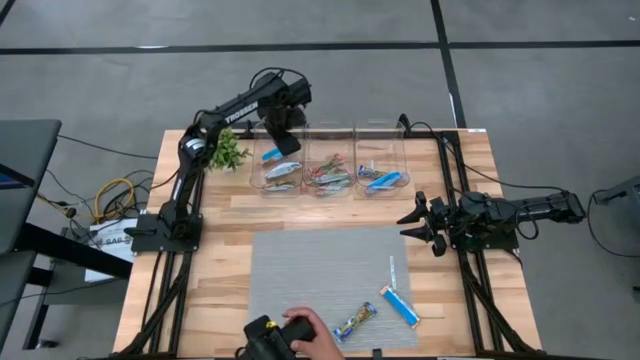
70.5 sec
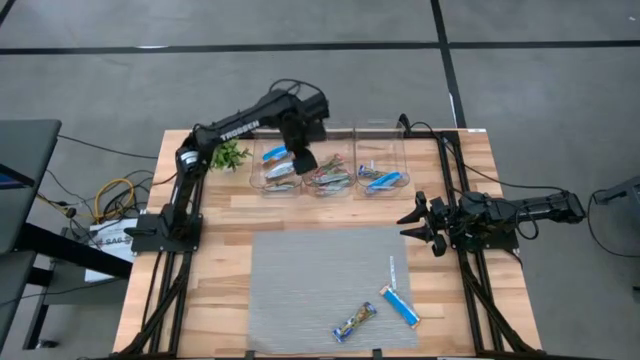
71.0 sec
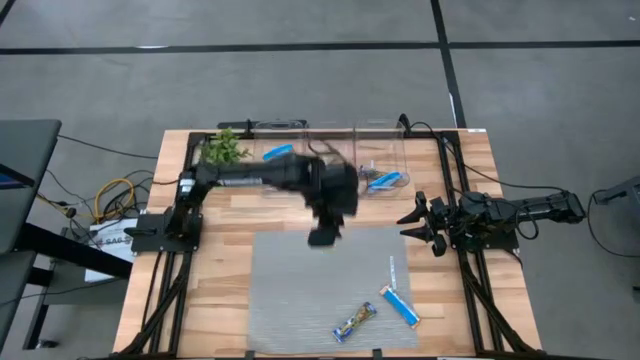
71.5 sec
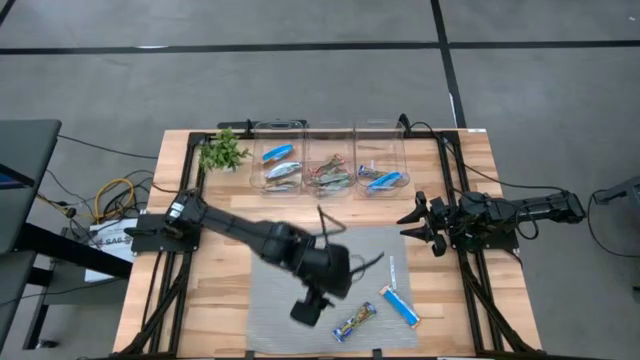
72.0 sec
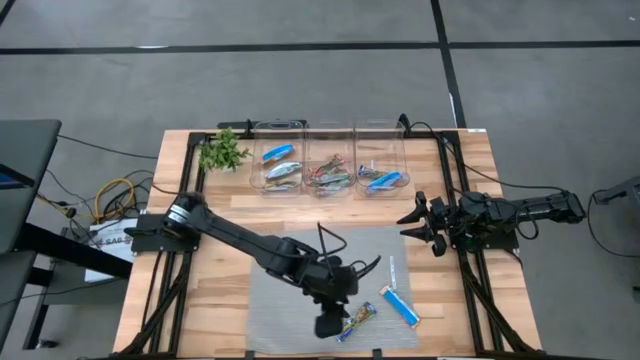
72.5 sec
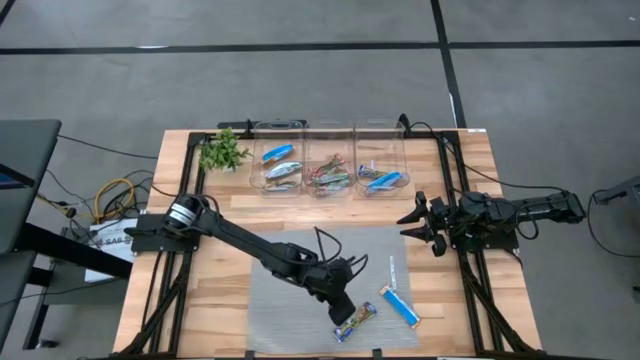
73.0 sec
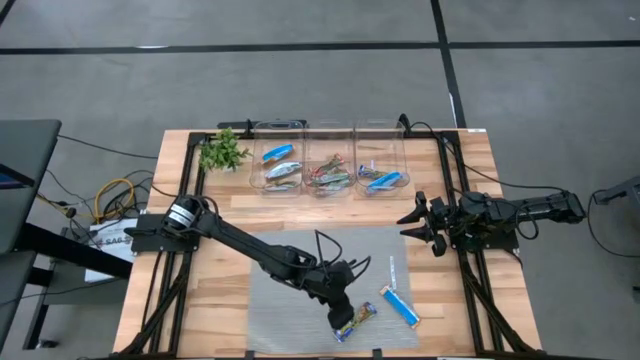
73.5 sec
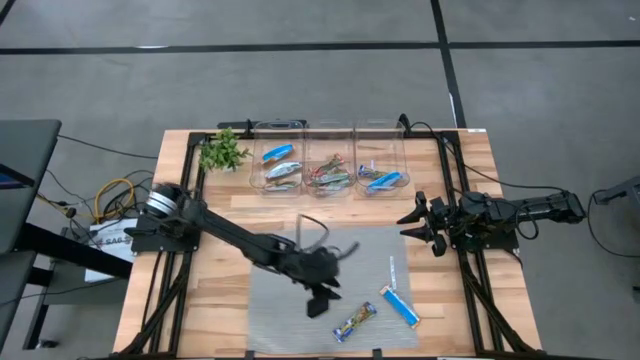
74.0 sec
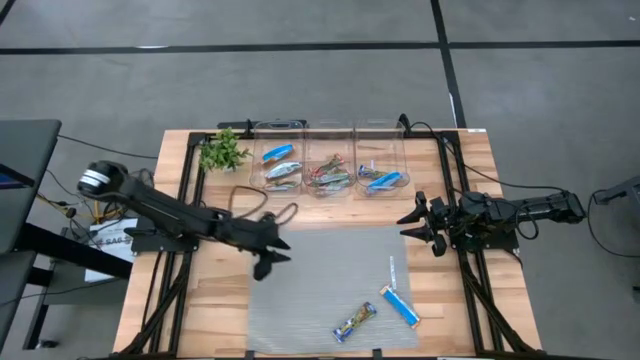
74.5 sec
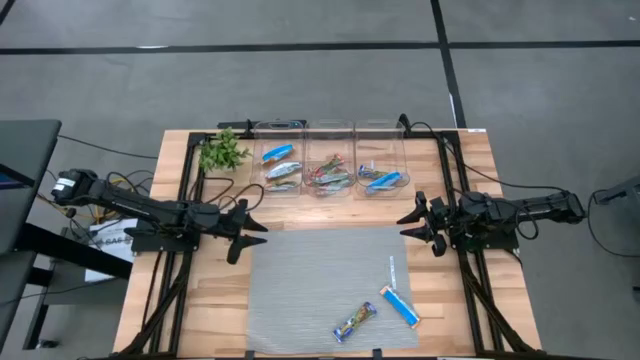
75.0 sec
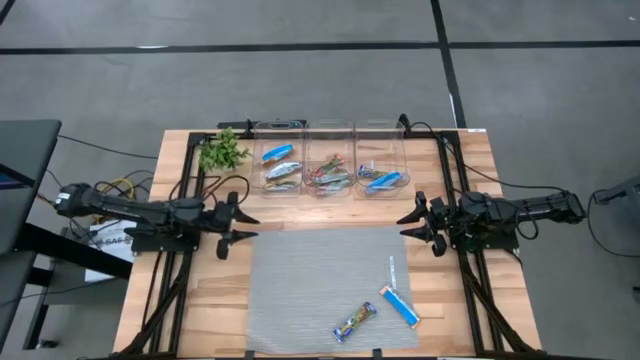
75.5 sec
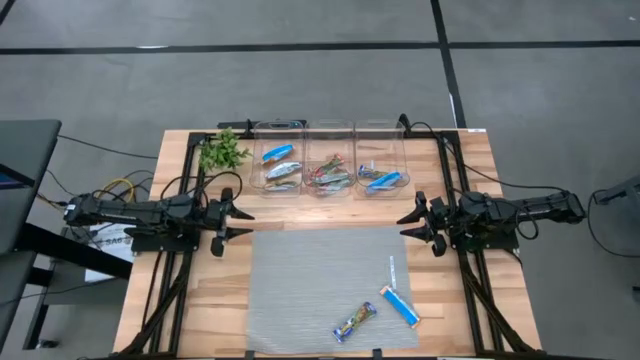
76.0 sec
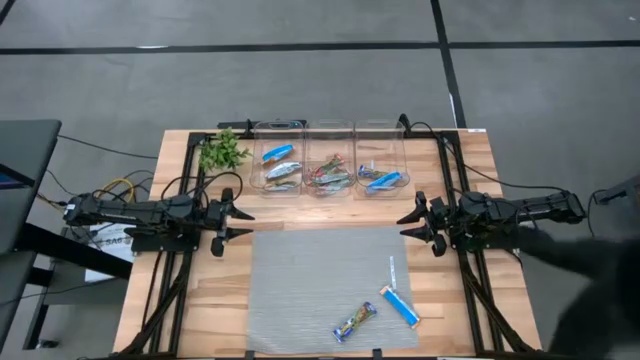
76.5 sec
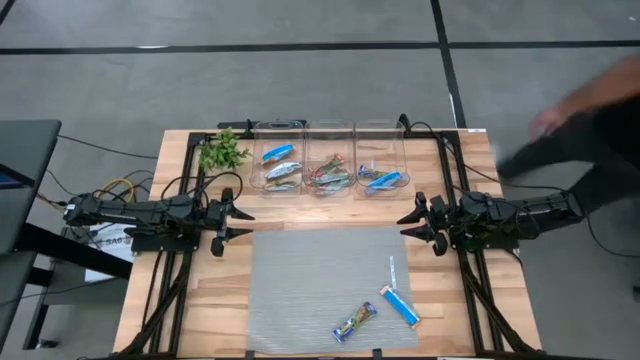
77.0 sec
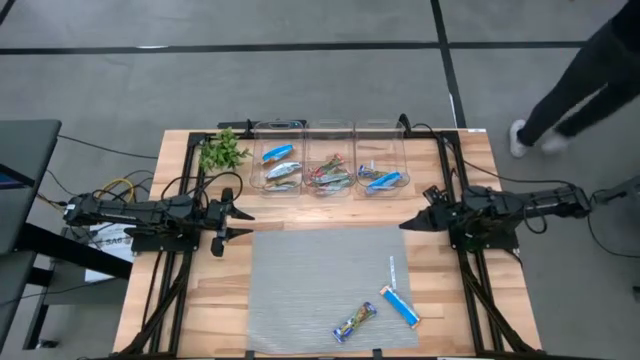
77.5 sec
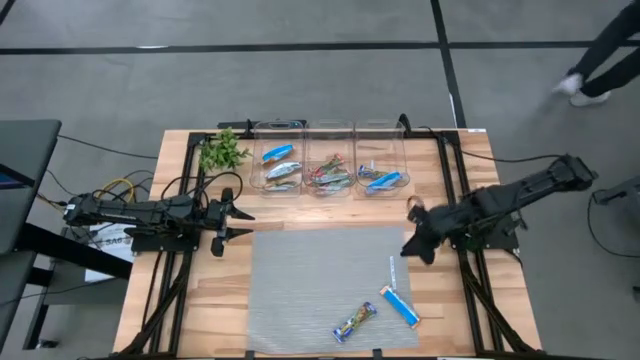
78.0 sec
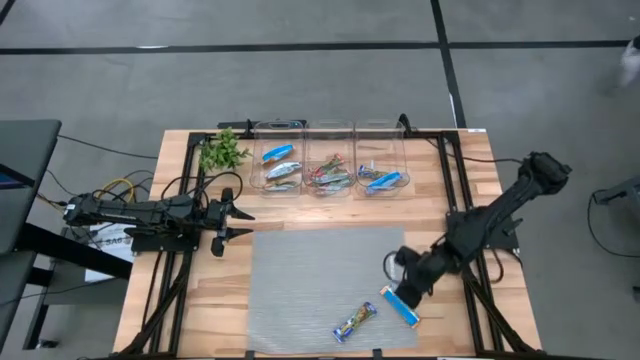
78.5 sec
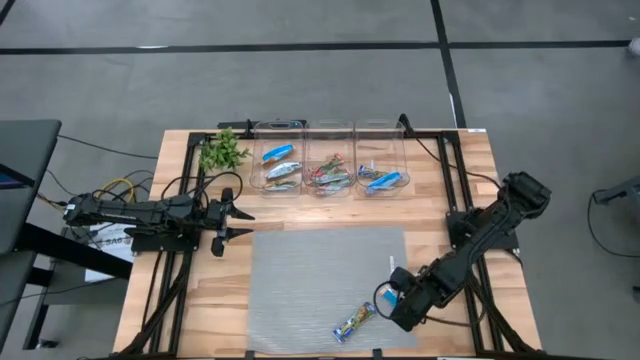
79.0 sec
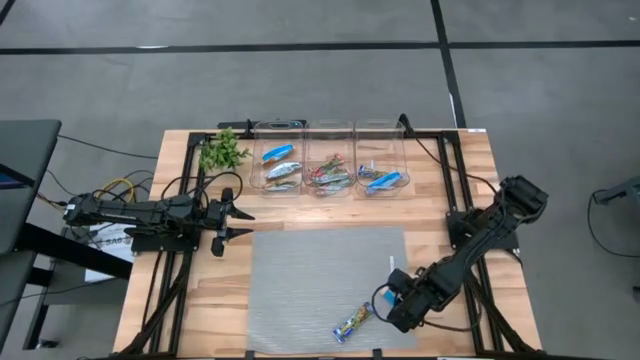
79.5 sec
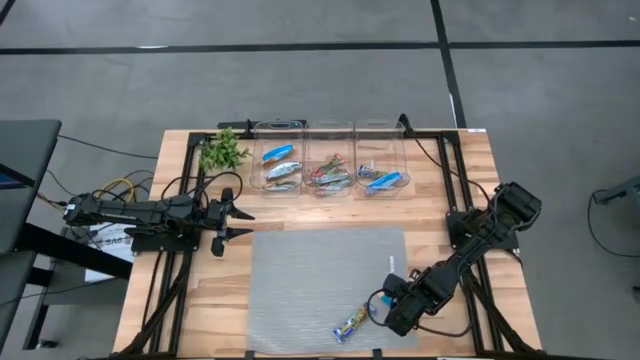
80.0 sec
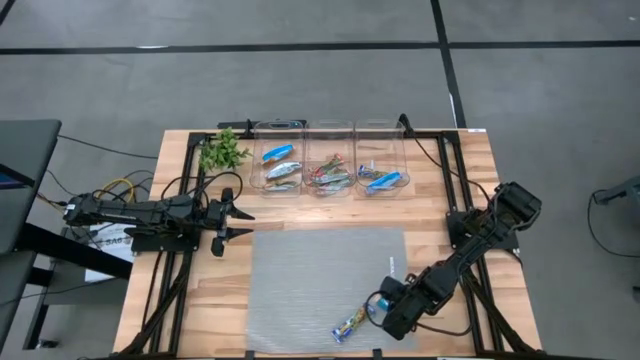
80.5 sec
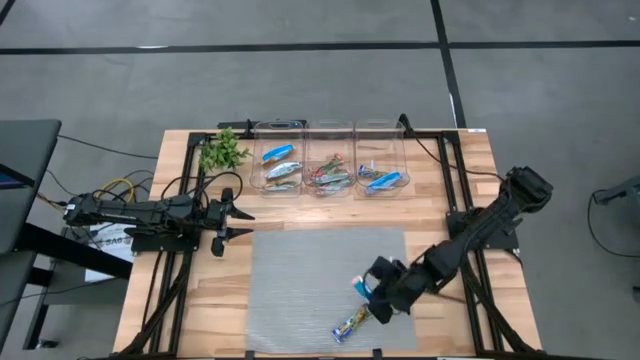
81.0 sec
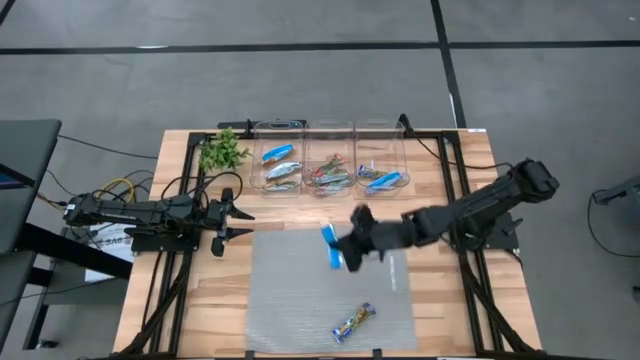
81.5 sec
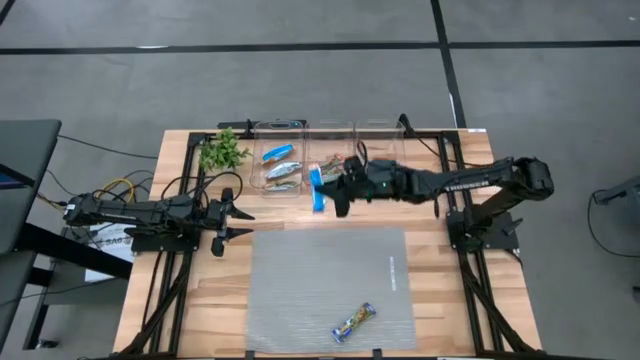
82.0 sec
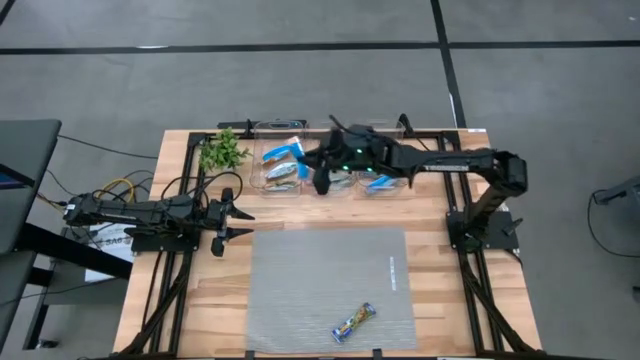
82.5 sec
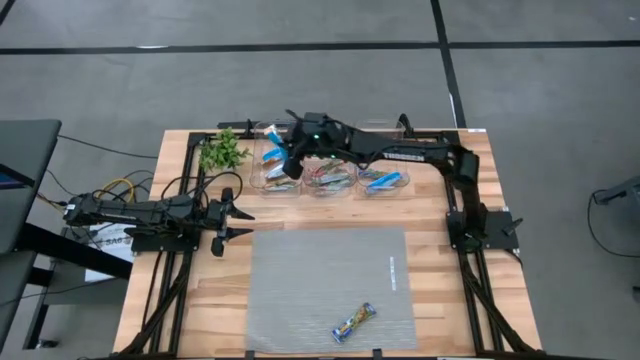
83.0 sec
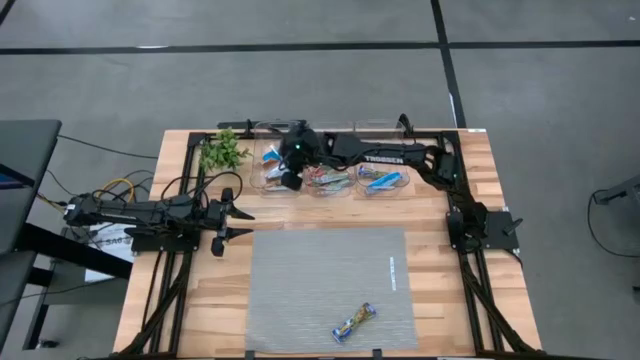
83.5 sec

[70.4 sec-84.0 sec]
Task: Pick and place Granola Bars by type
Put the yellow granola bar into the left transparent bin

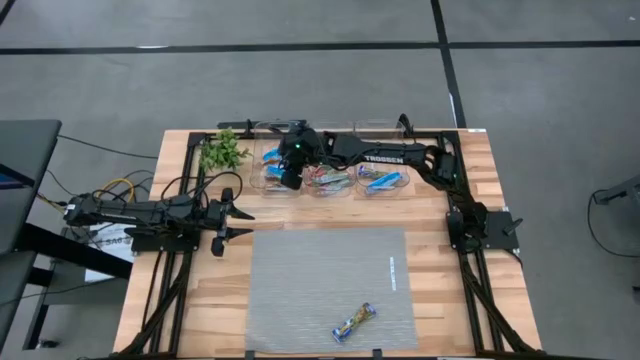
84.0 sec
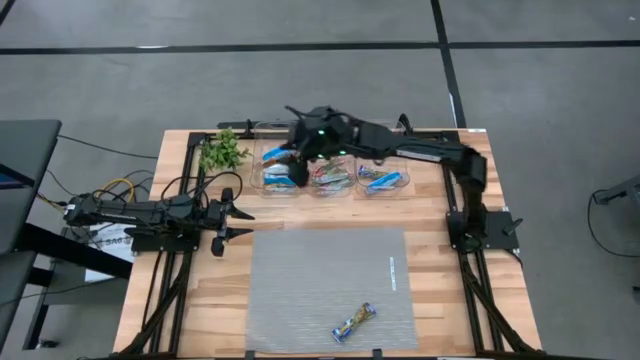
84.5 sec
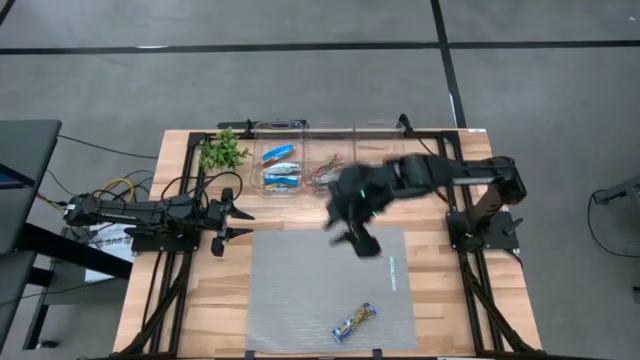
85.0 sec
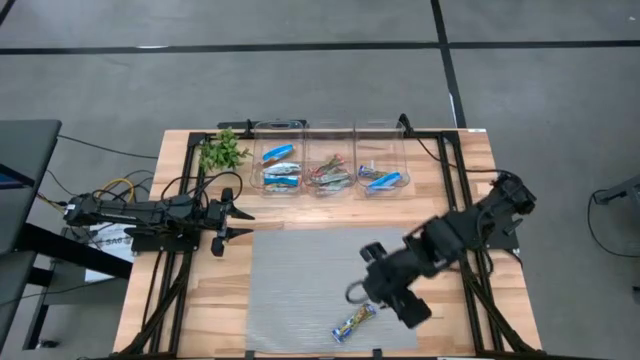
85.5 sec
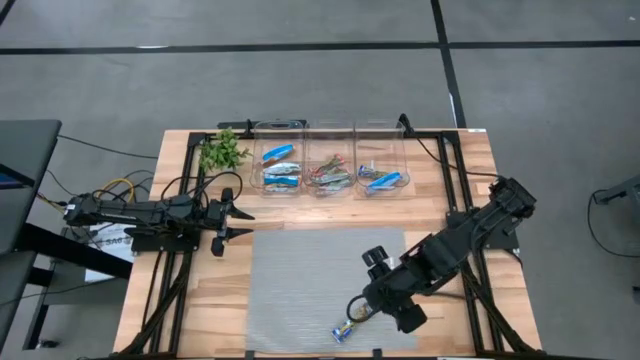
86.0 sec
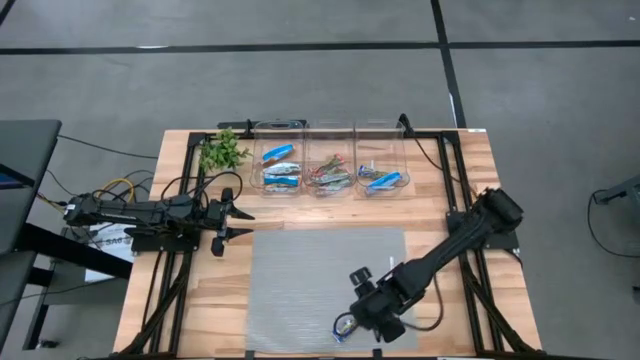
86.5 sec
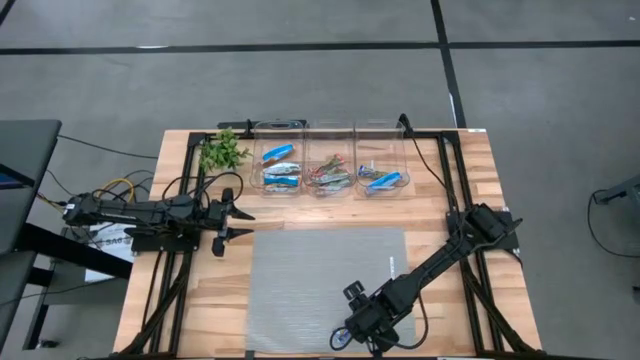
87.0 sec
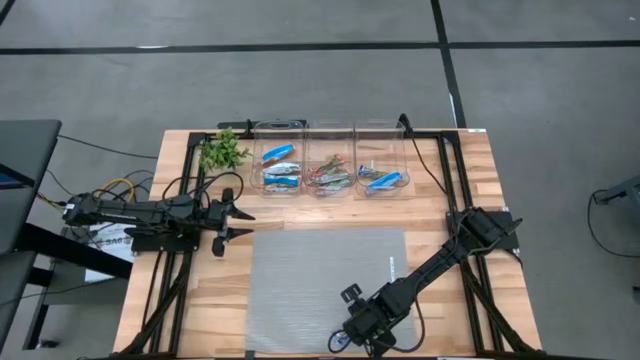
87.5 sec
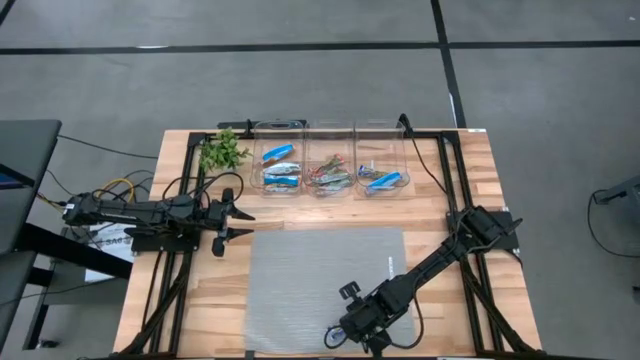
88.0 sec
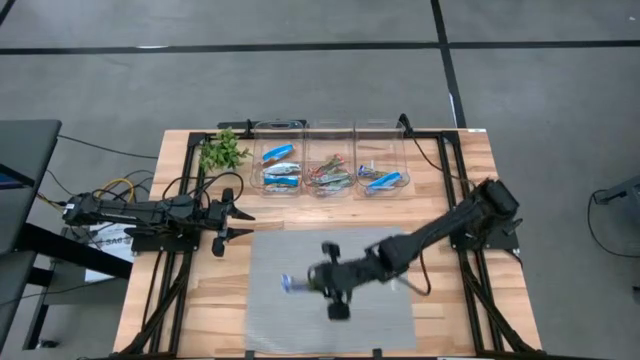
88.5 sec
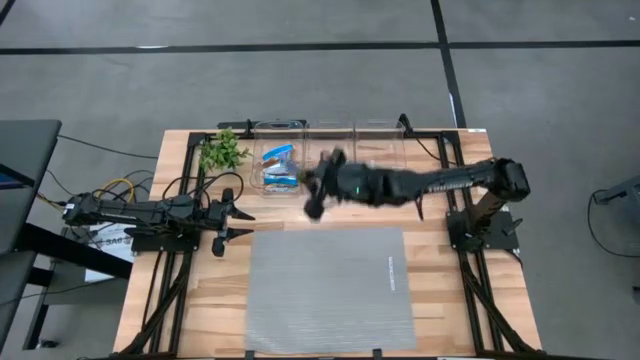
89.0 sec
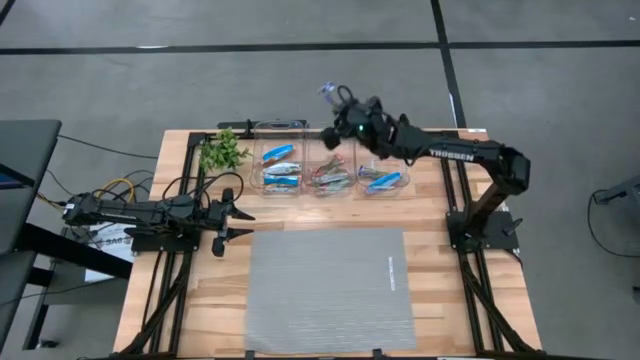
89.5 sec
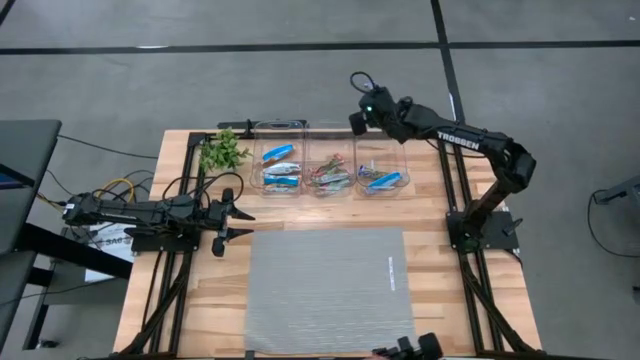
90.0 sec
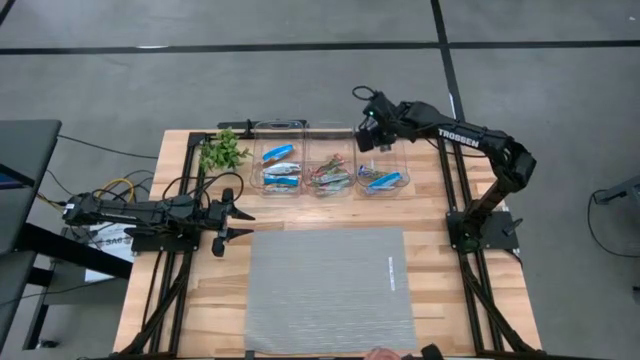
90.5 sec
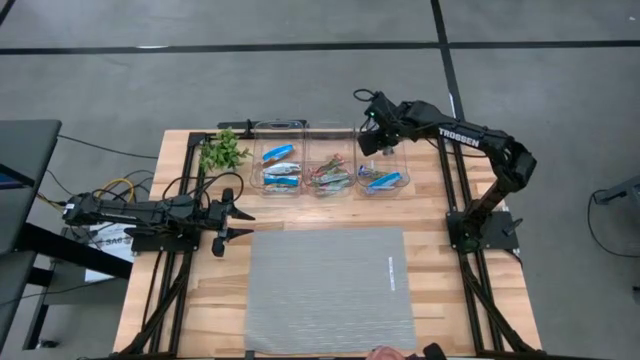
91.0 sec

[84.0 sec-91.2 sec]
Put the purple granola bar into the right transparent bin

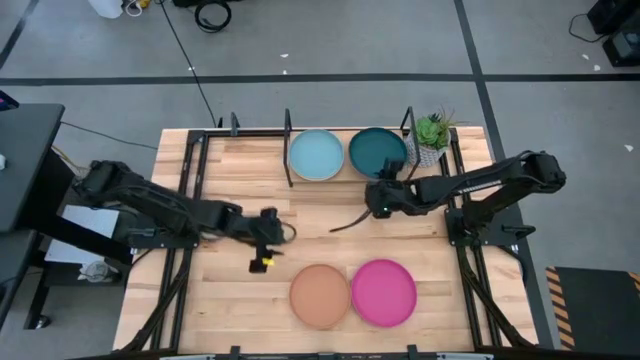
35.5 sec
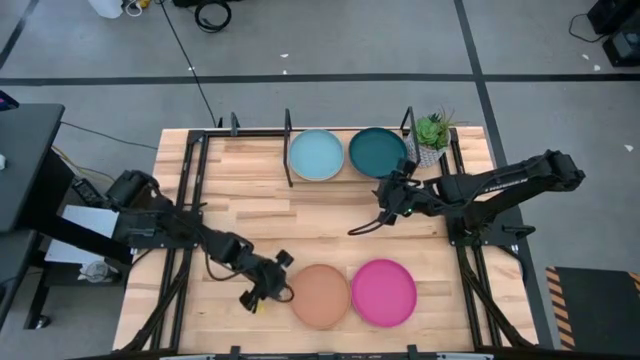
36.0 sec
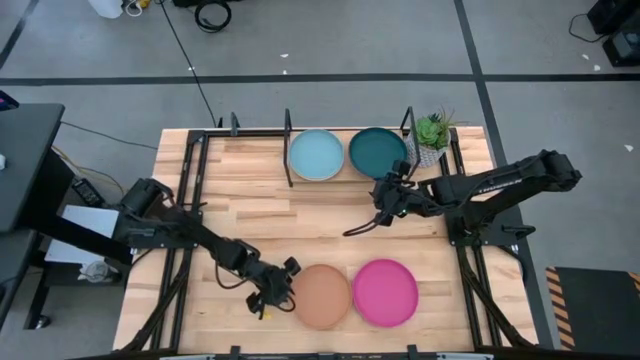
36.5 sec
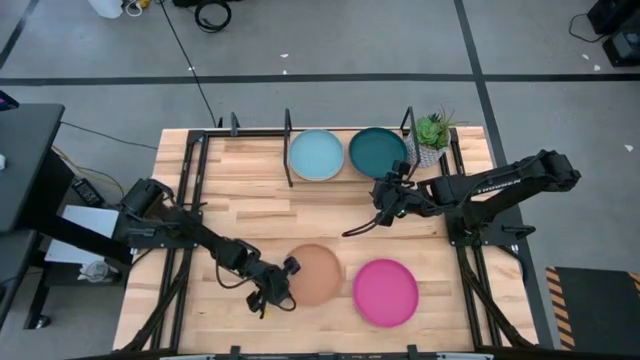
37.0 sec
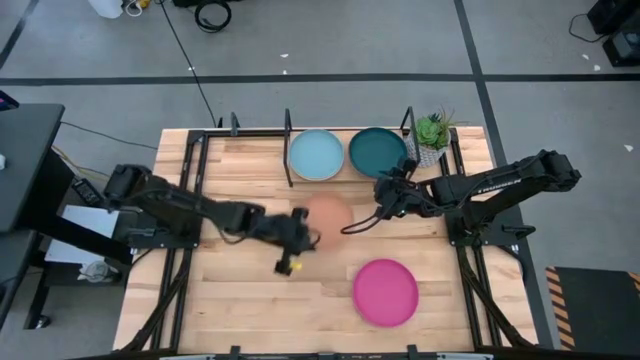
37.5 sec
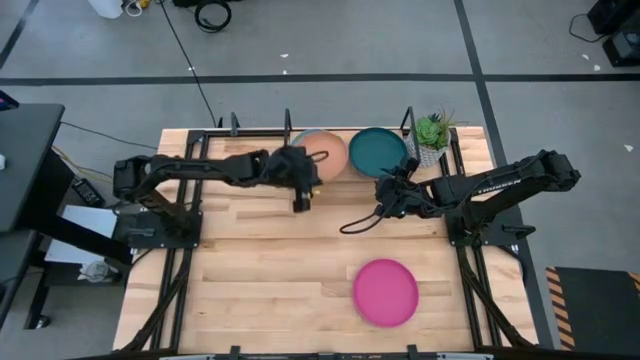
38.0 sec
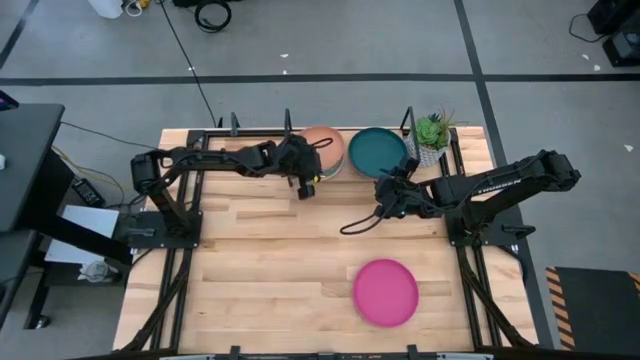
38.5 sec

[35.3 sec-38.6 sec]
Task: Place and stack plates onto a shelf
Stack the brown plate on top of the light blue plate on the shelf
